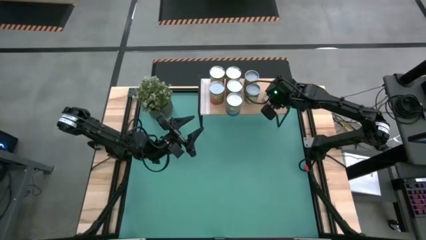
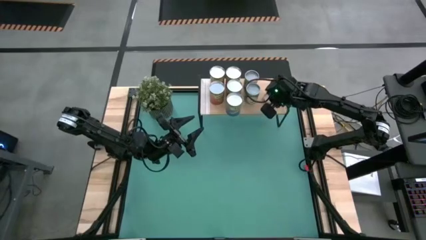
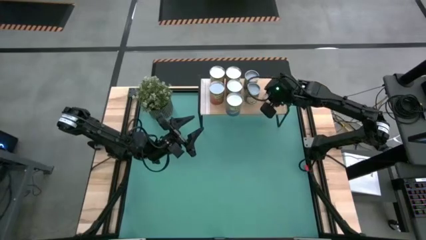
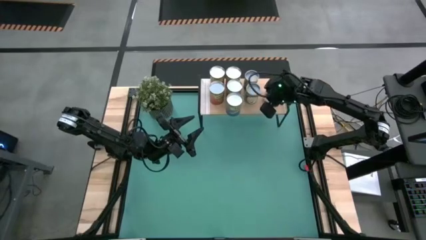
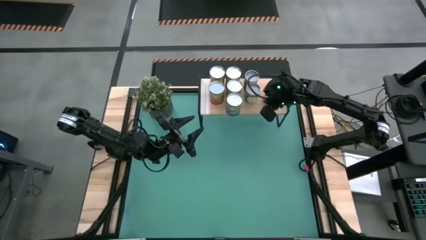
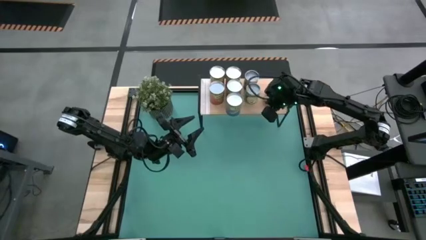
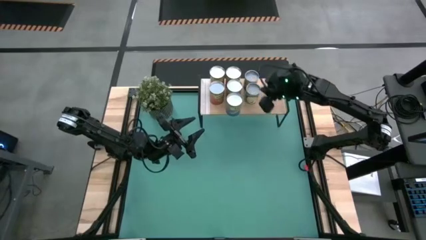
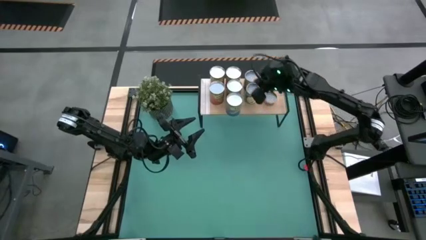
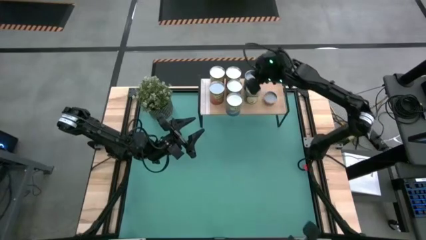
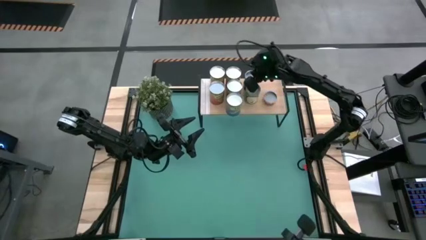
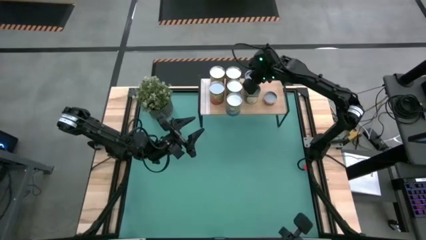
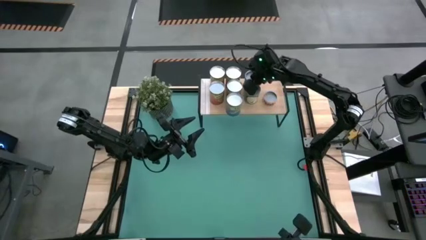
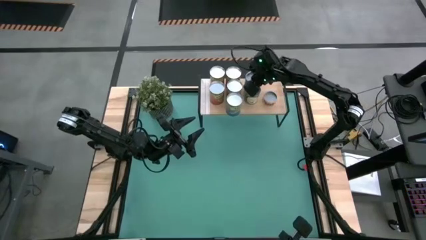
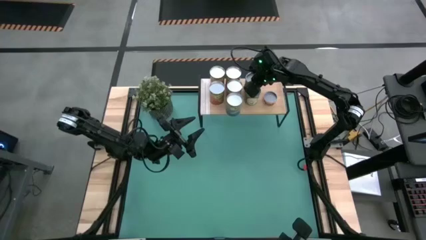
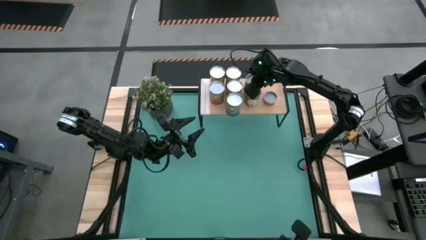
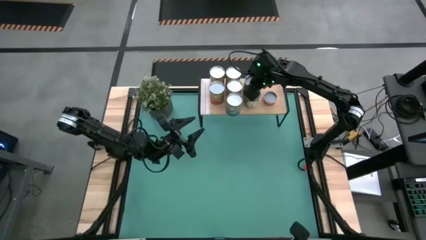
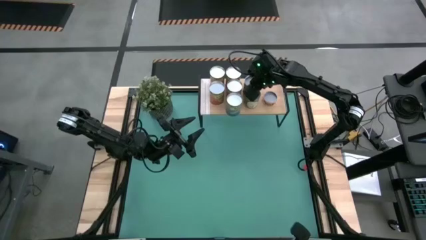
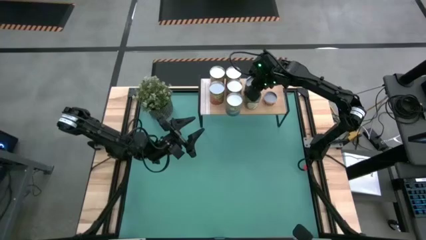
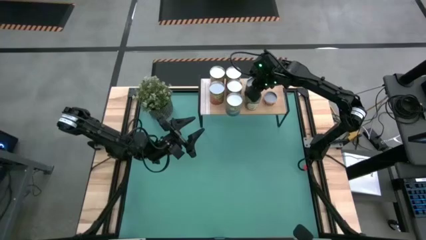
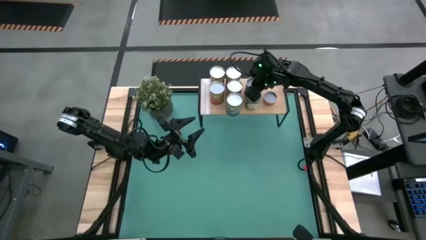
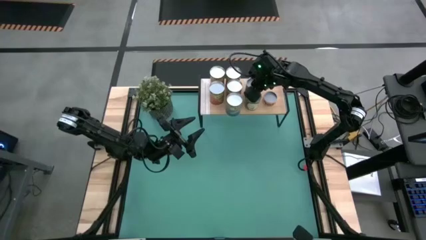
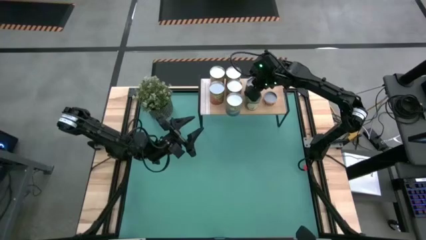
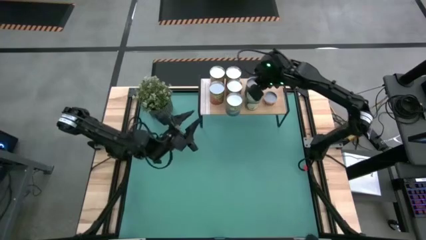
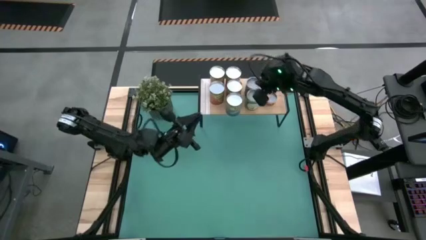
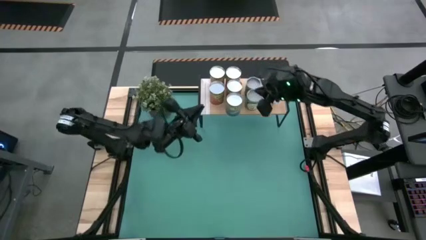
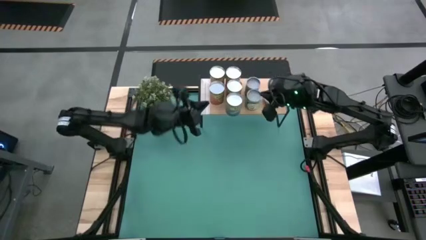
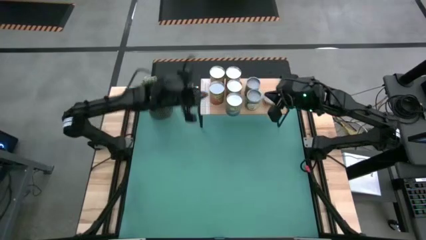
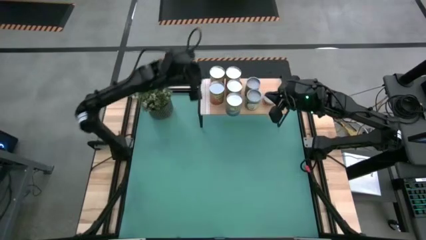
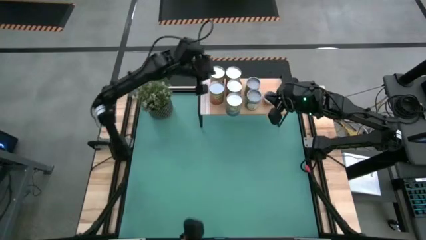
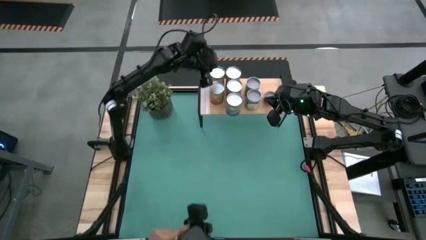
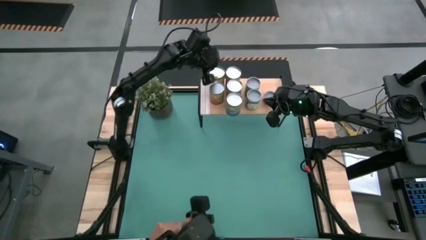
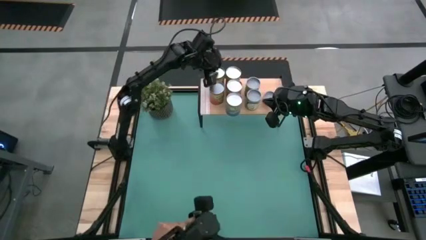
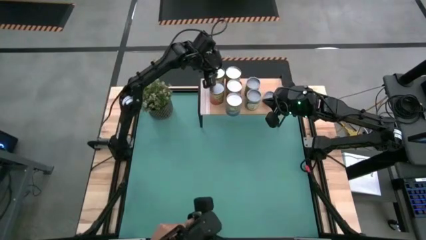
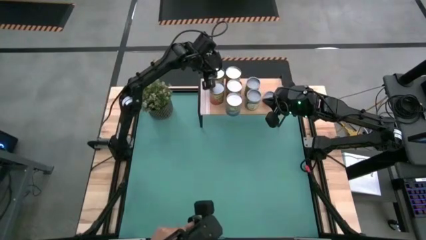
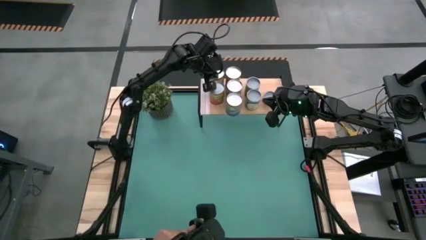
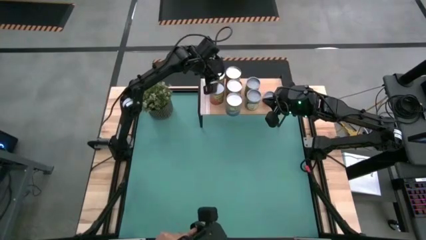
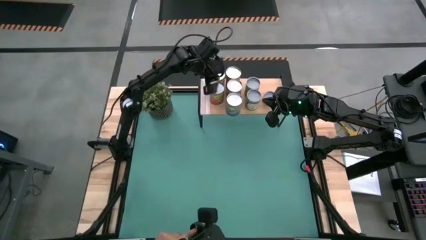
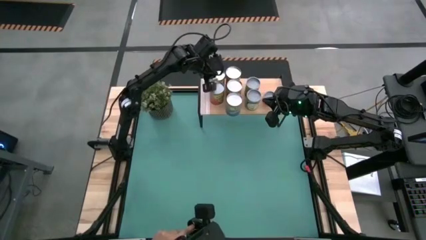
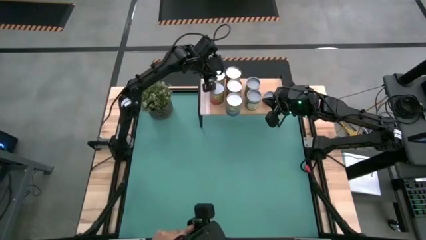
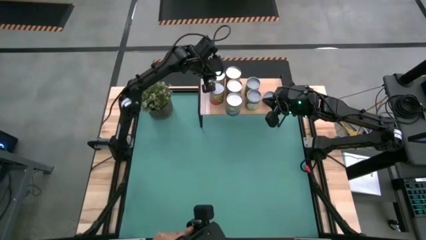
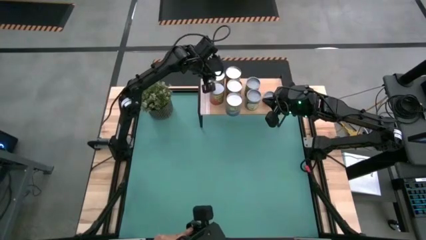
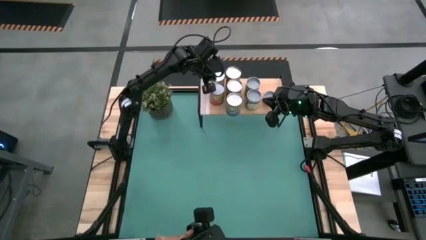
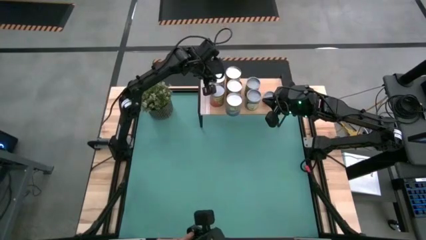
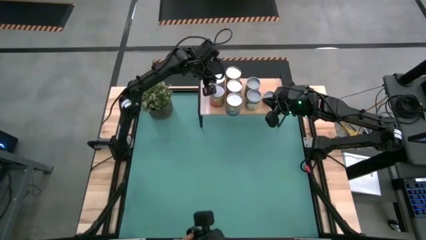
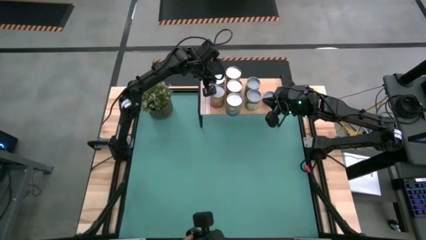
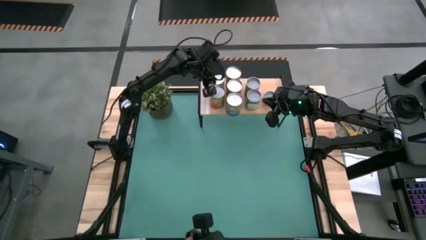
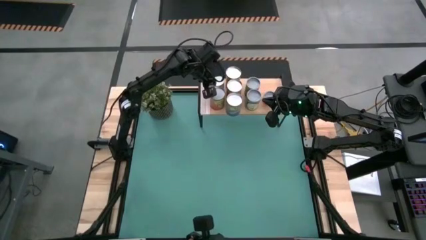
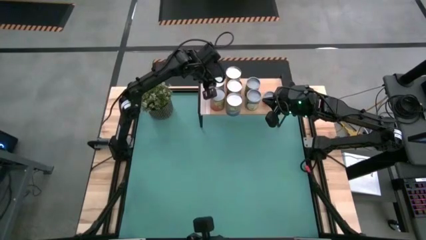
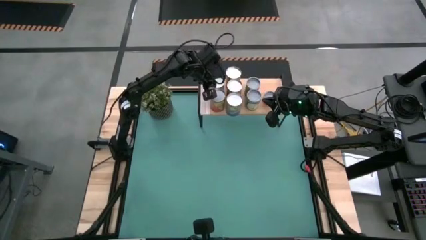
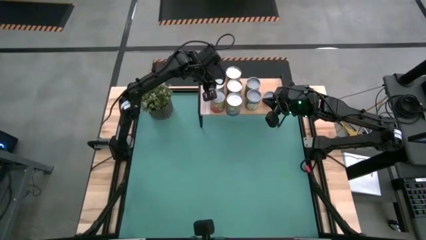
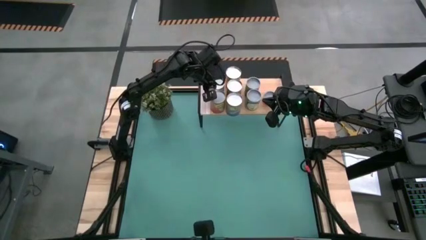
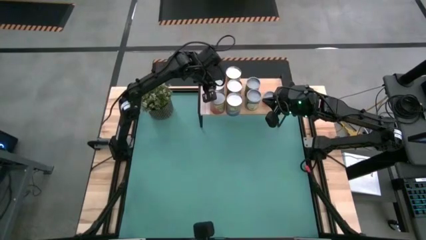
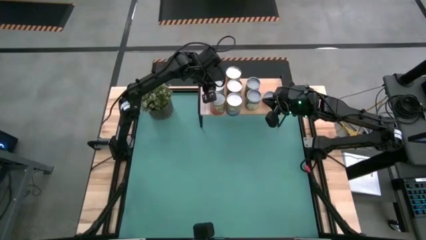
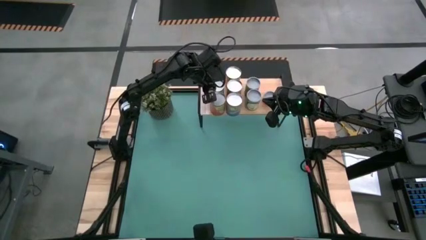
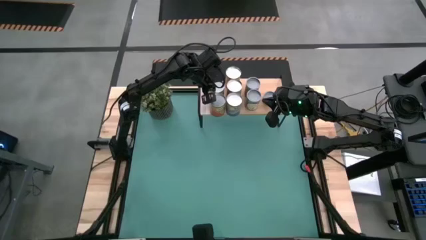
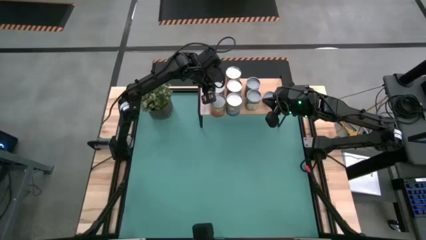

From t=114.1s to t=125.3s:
Task: Pick and place cans onto a shelf
Adjust the canned goods on the shelf
